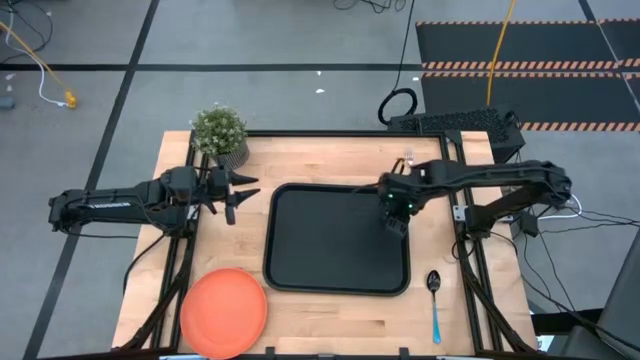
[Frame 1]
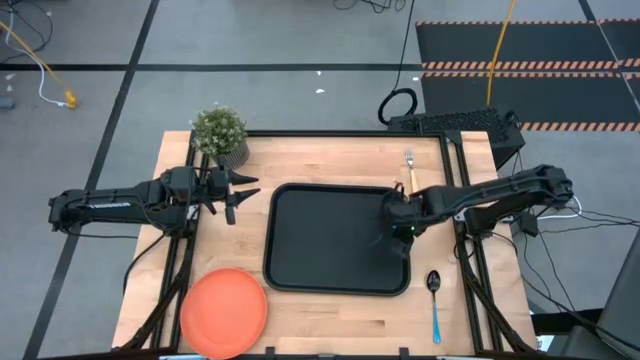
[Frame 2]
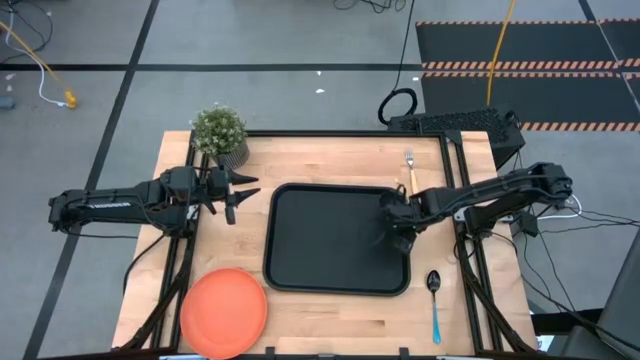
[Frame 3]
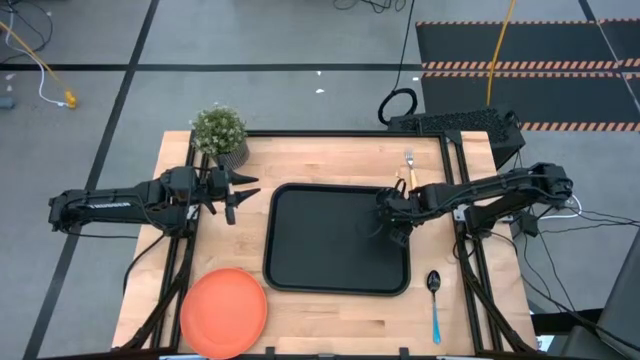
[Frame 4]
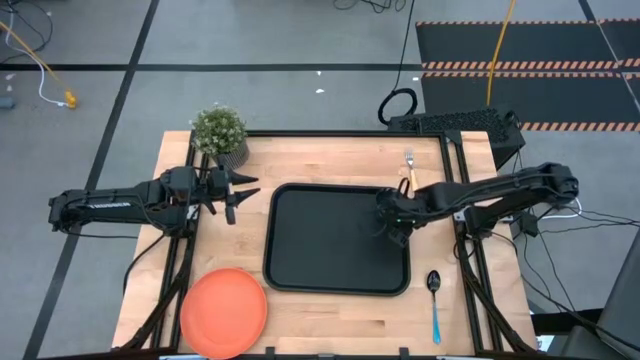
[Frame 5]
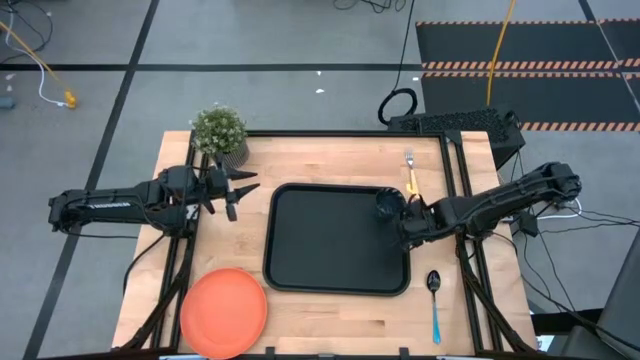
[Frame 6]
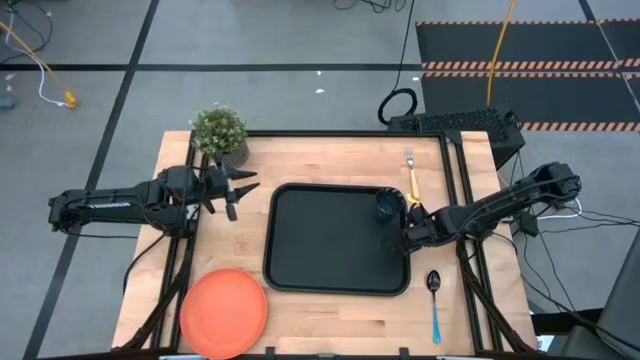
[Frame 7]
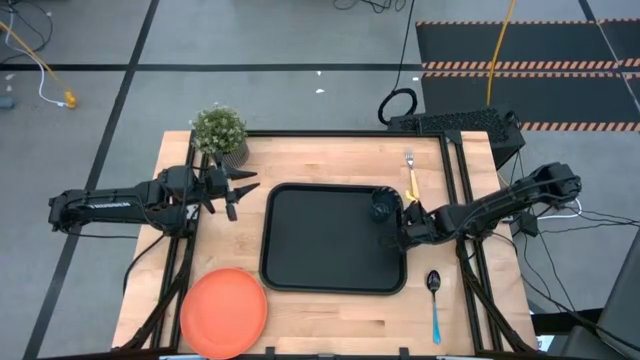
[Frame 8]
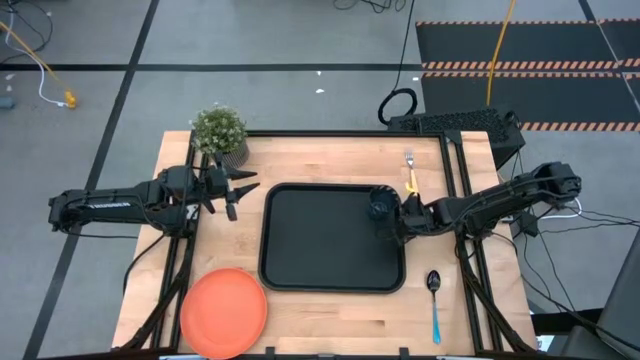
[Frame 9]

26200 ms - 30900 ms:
Task: Pick and place plate/cup/fork/spoon on tray
Adjust the black tray on the table

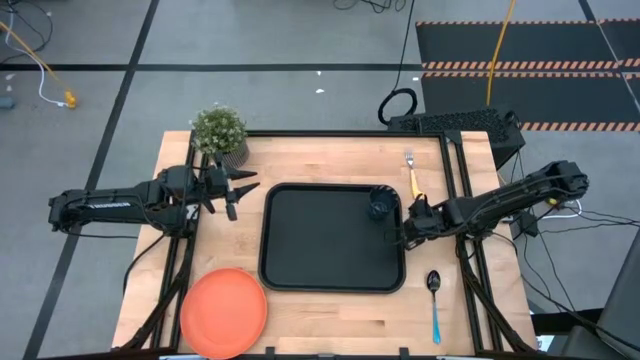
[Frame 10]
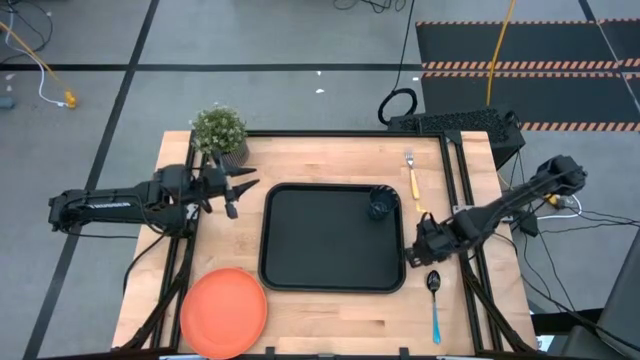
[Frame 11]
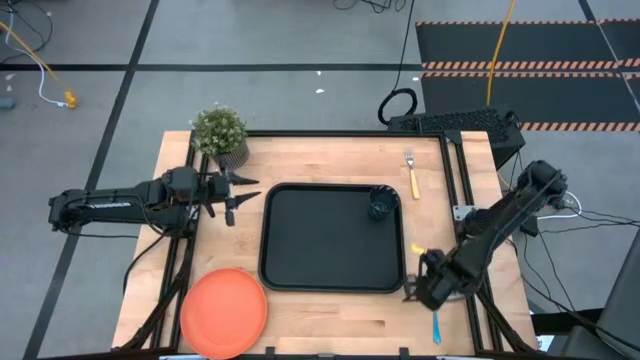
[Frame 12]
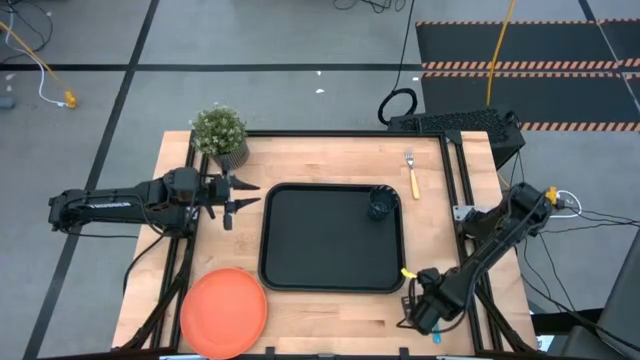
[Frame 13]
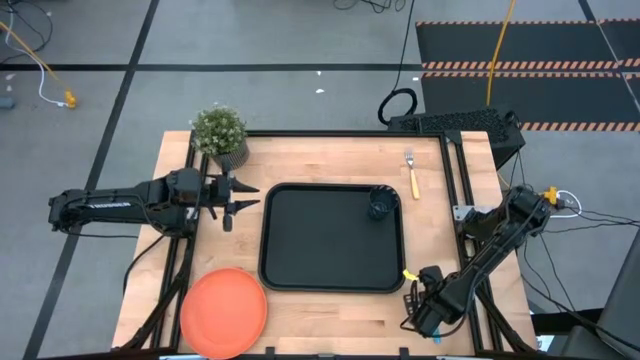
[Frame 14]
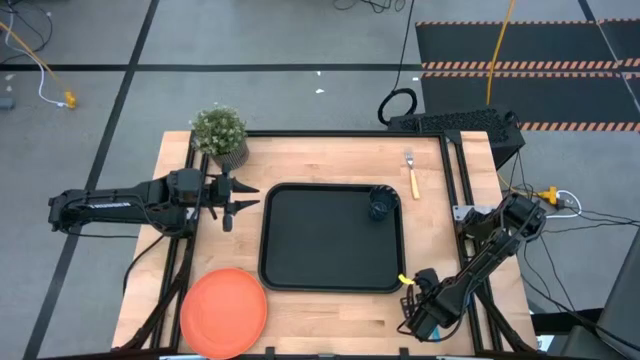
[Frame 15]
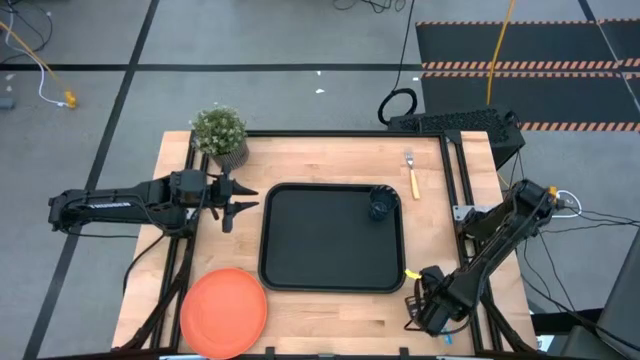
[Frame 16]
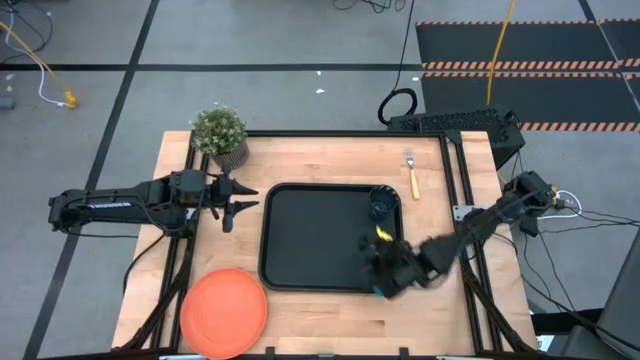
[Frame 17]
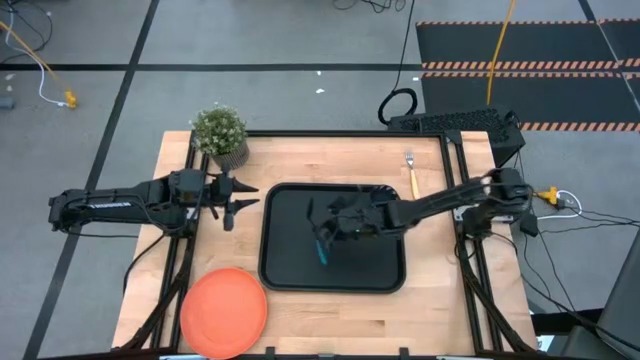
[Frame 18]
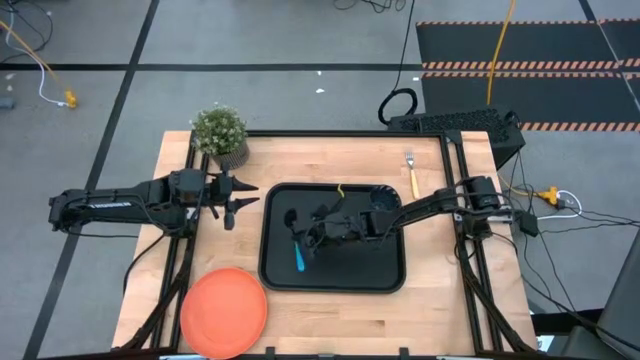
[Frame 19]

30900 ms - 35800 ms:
Put the blue spoon on the black tray

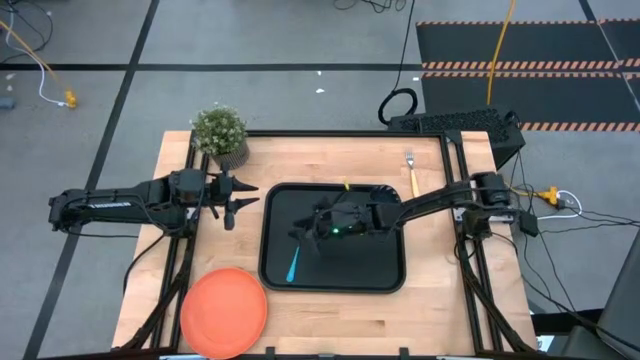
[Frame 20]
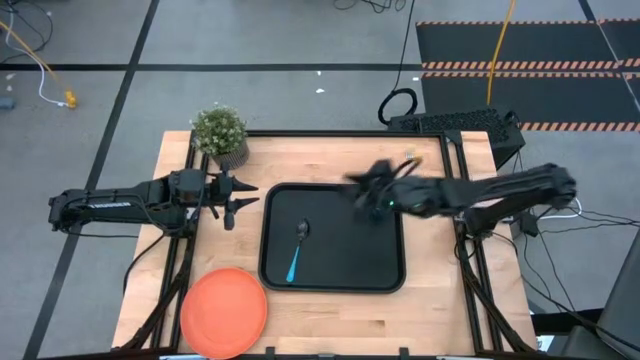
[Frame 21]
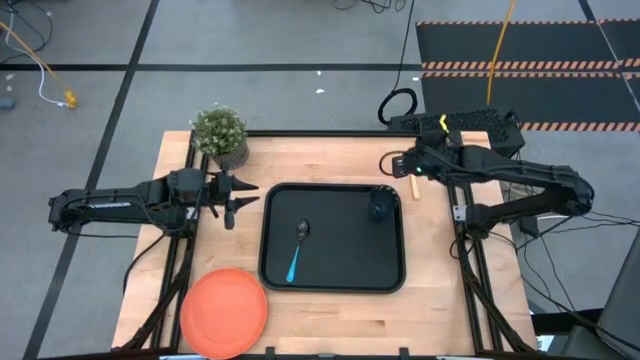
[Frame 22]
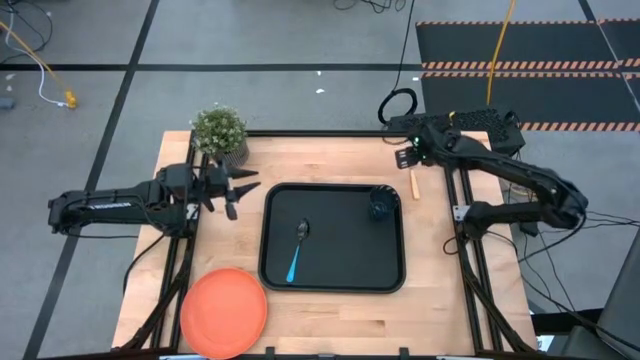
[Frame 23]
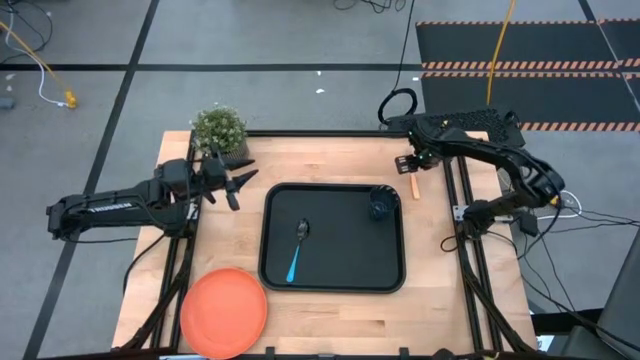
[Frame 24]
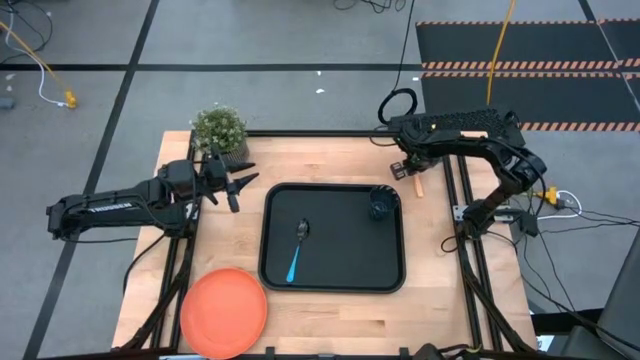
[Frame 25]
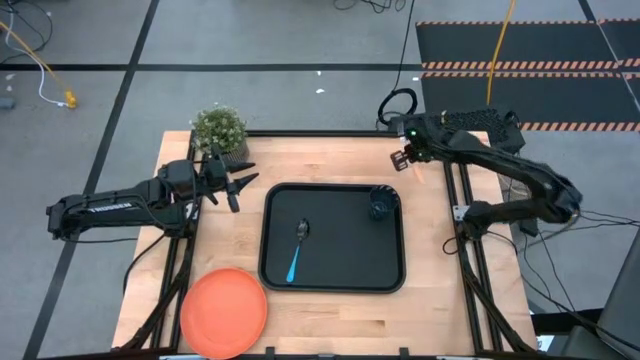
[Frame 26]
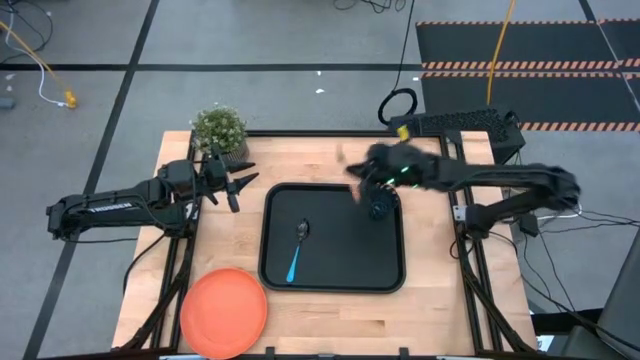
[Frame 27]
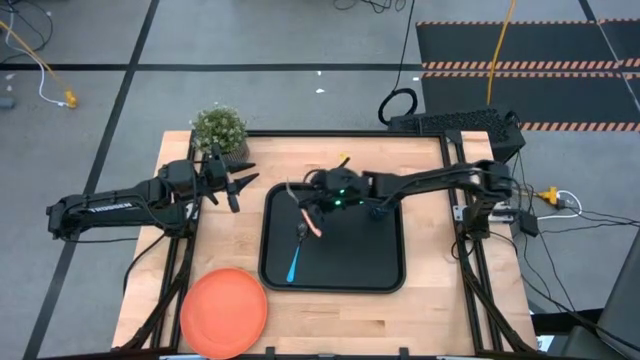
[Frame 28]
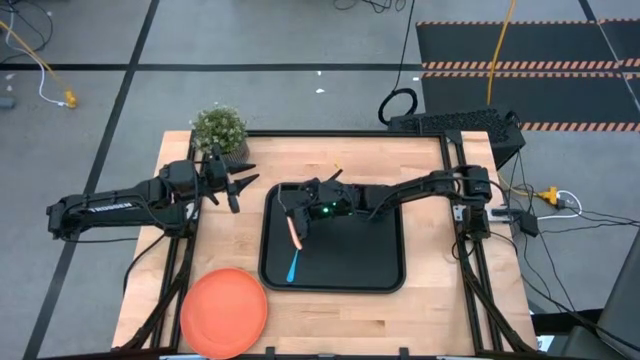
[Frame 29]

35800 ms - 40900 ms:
Put the orange fork on the black tray

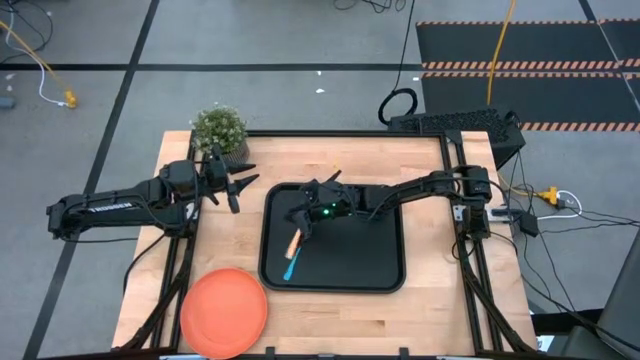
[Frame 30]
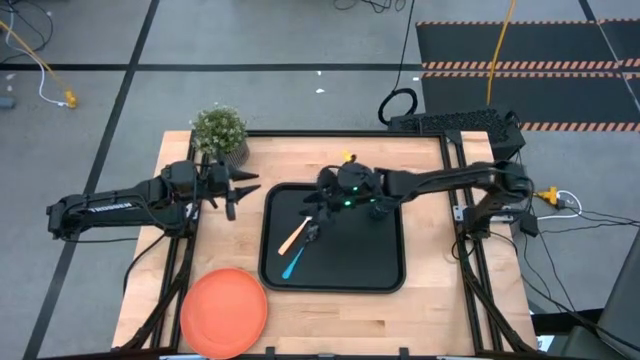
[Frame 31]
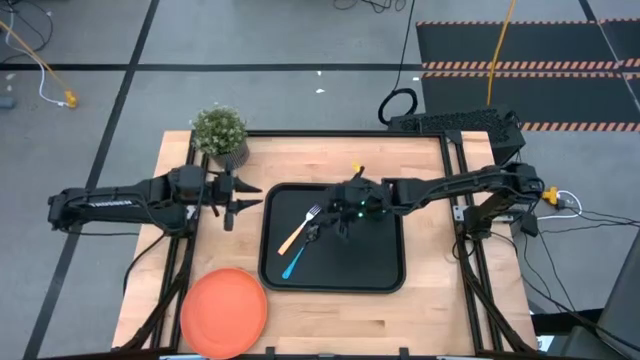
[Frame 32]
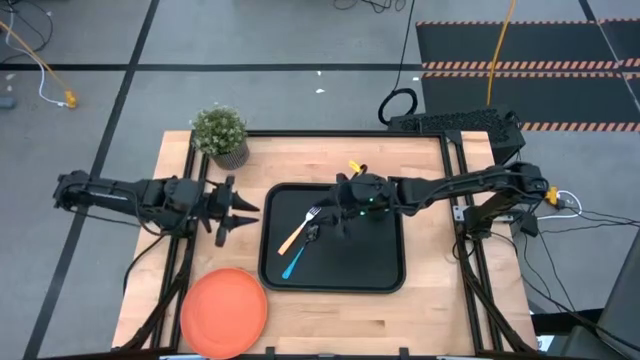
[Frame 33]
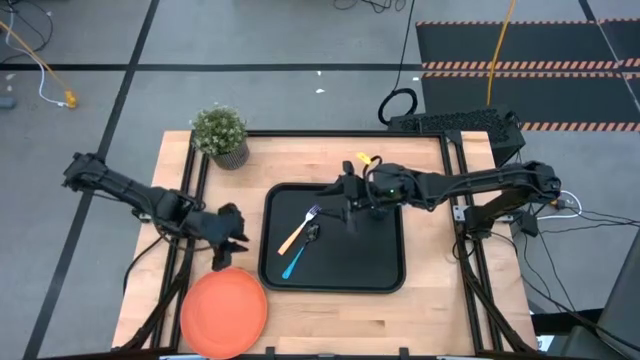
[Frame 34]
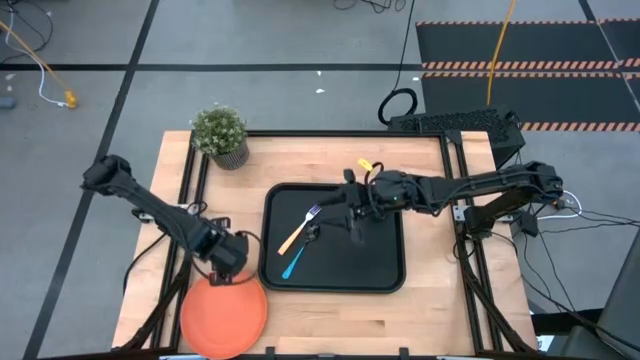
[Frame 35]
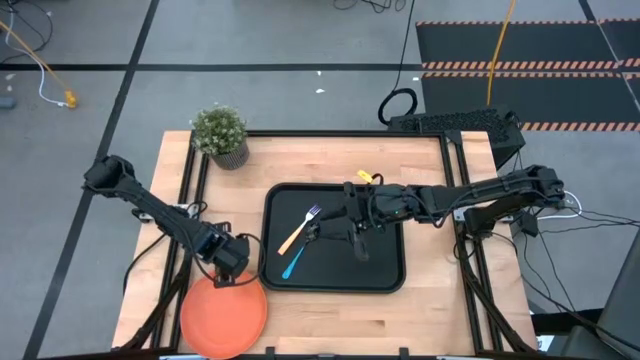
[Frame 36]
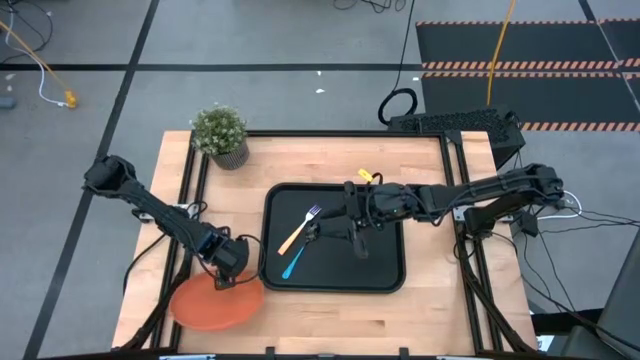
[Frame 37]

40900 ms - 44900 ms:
Put the orange plate on the black tray

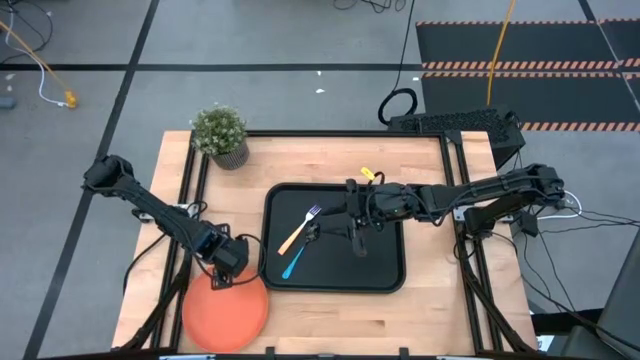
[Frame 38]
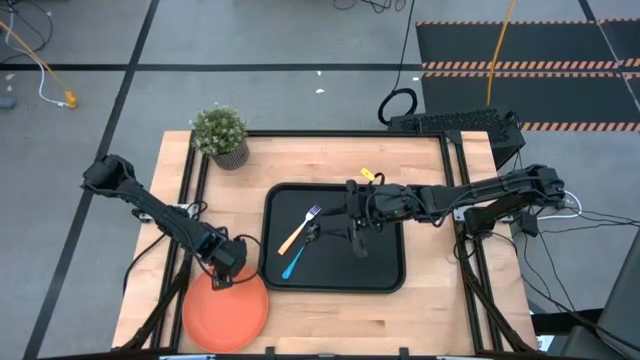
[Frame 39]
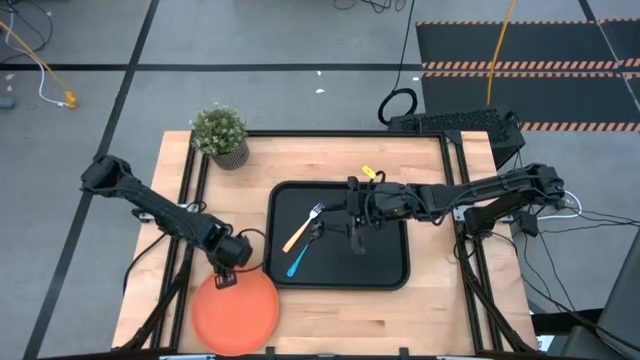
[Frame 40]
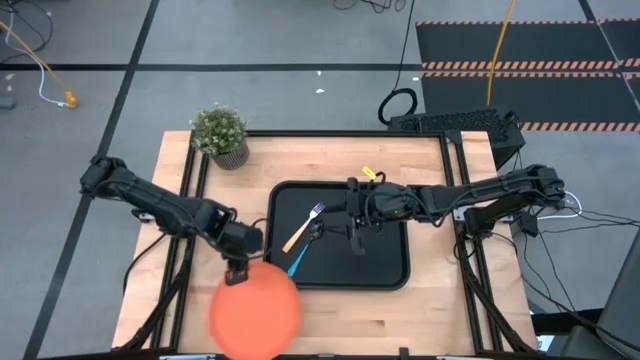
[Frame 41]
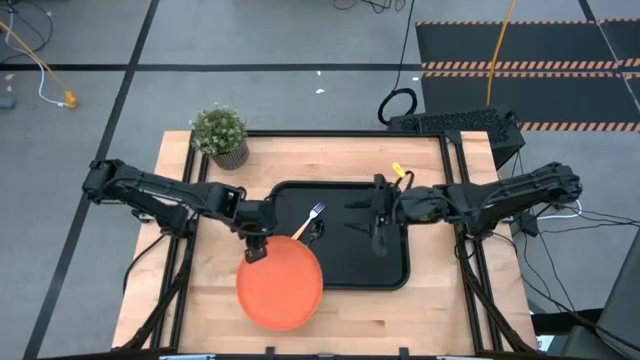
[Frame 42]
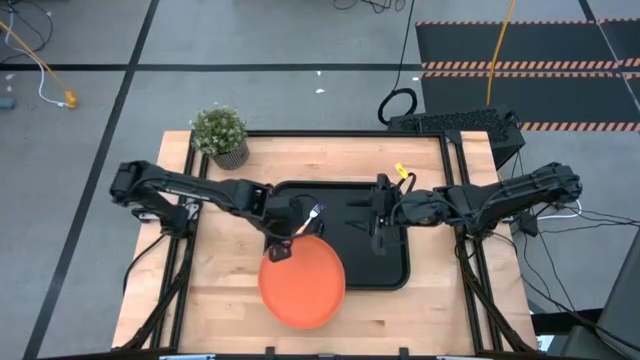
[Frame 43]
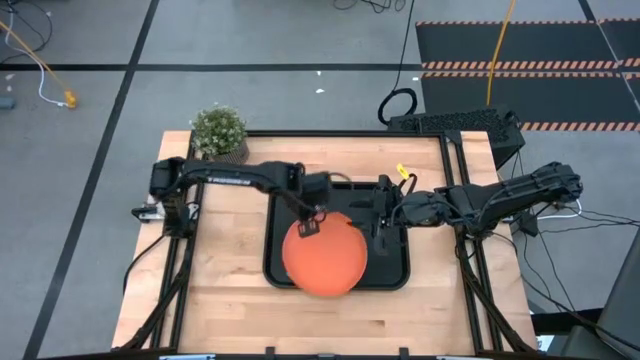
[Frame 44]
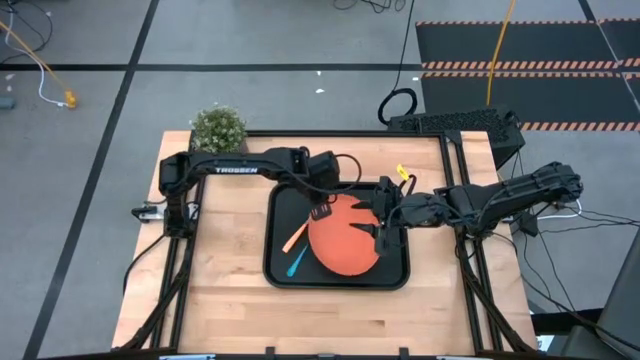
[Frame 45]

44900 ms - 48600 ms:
Put the orange plate on the black tray
